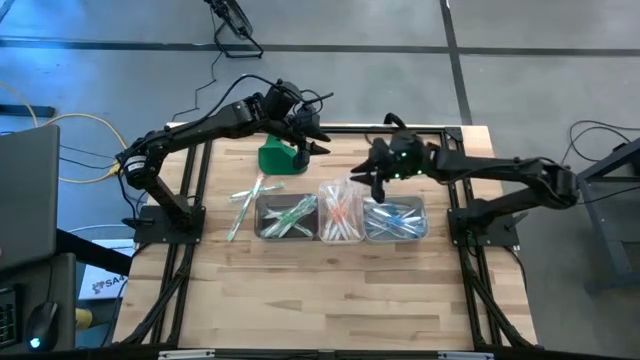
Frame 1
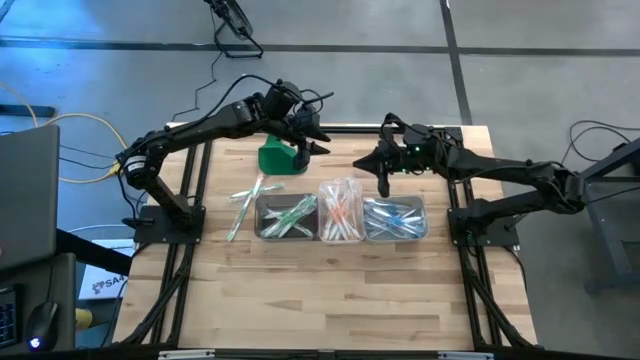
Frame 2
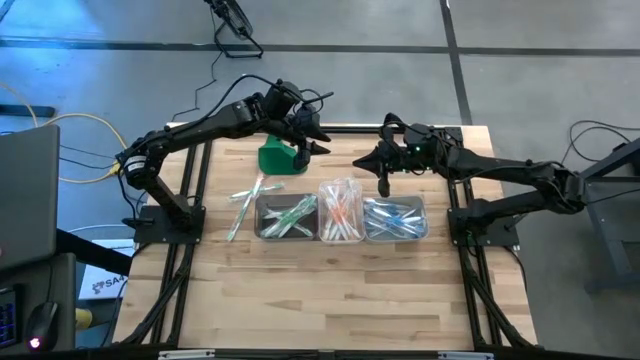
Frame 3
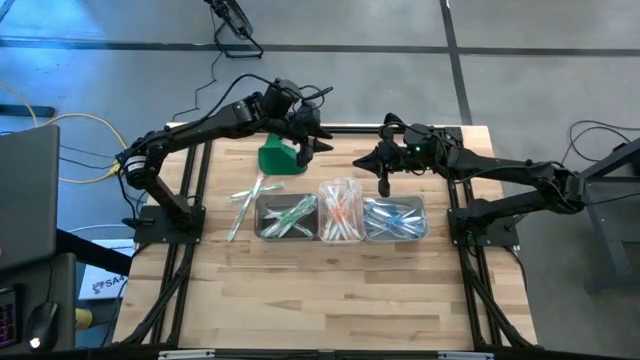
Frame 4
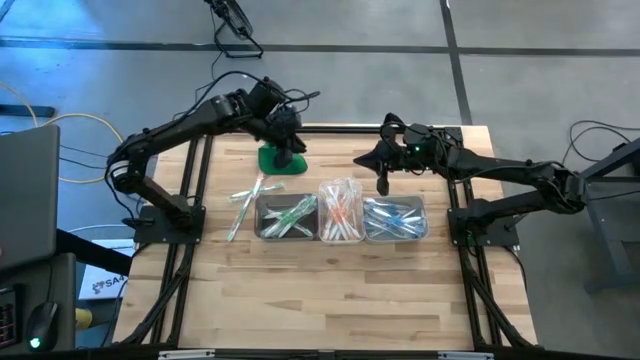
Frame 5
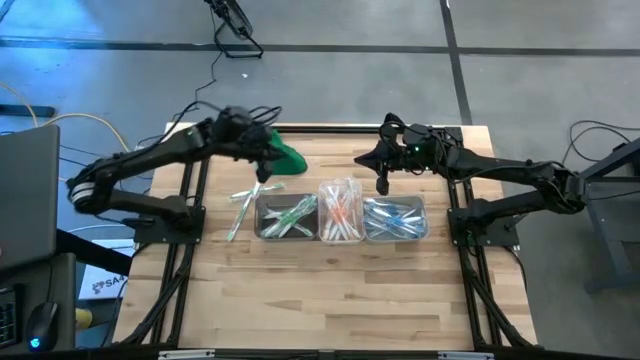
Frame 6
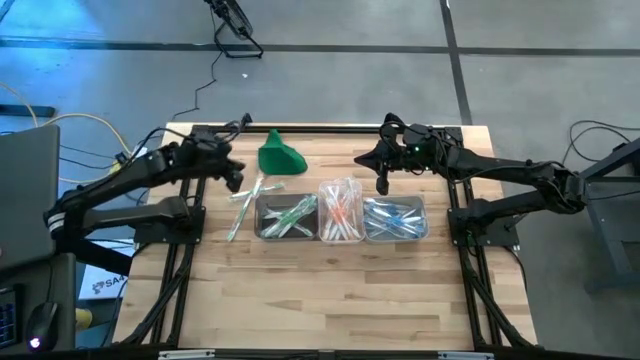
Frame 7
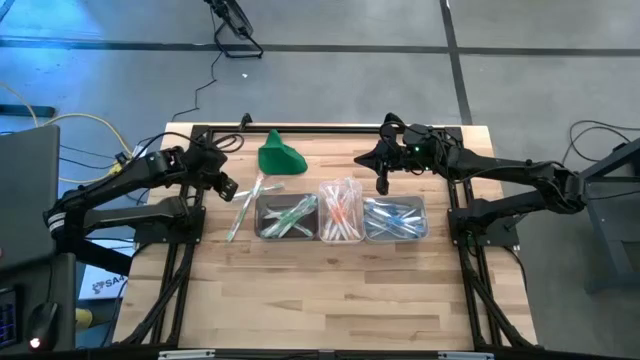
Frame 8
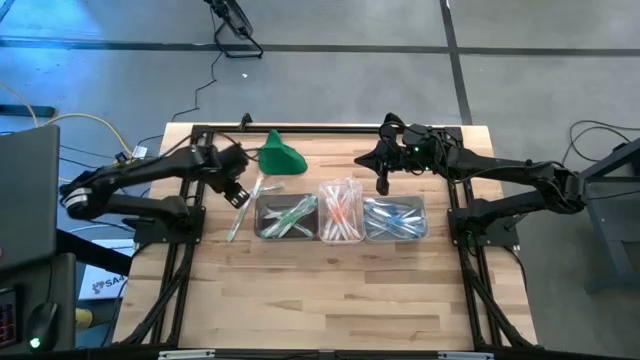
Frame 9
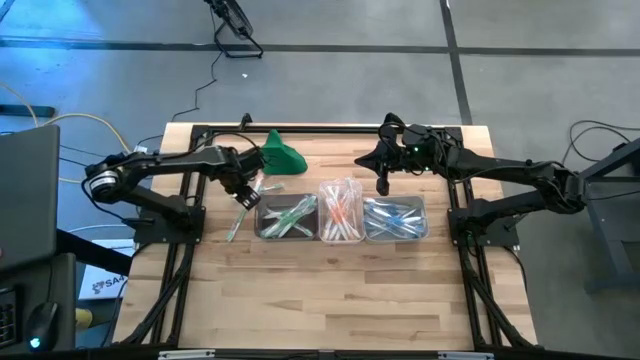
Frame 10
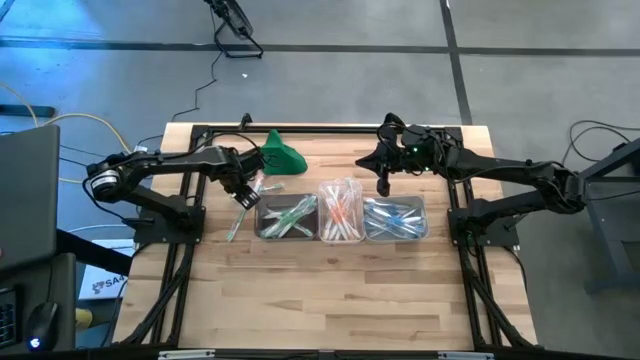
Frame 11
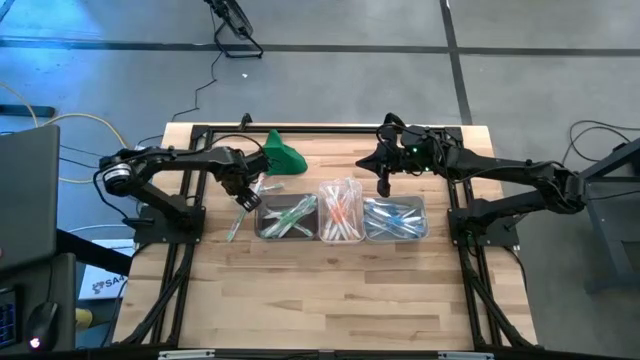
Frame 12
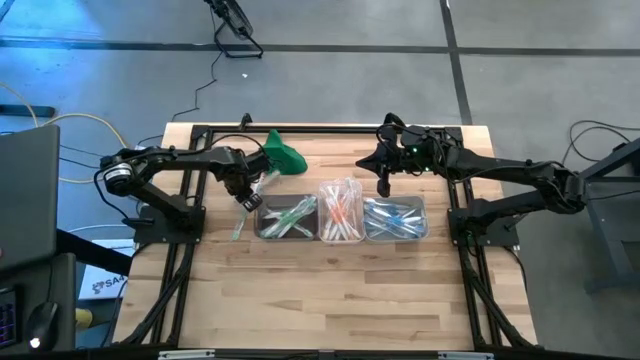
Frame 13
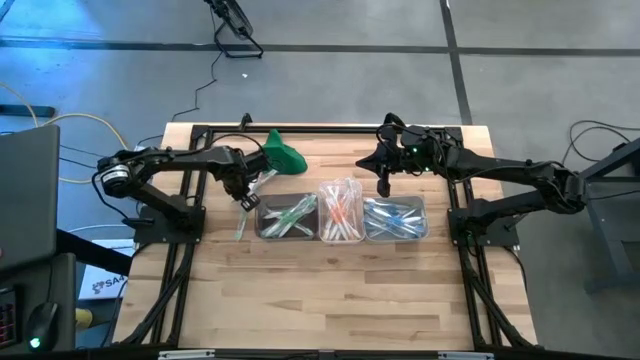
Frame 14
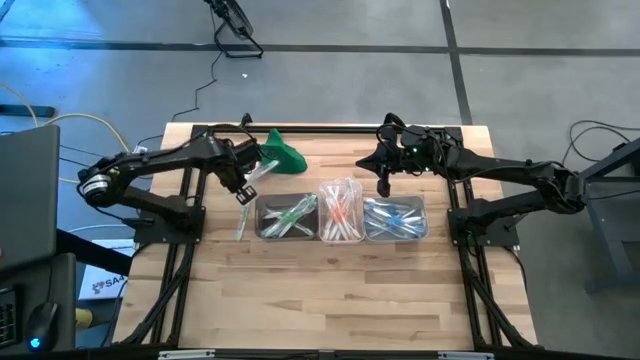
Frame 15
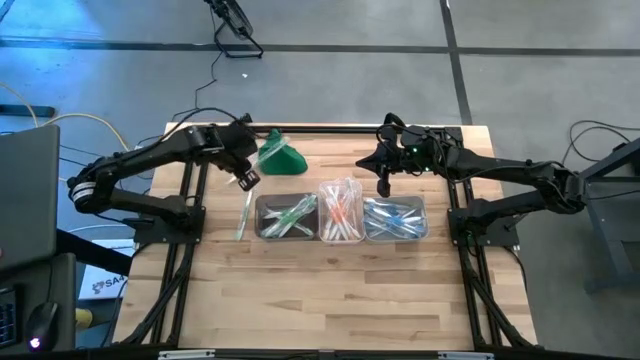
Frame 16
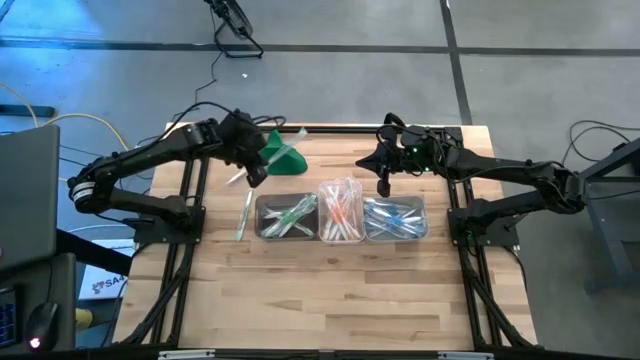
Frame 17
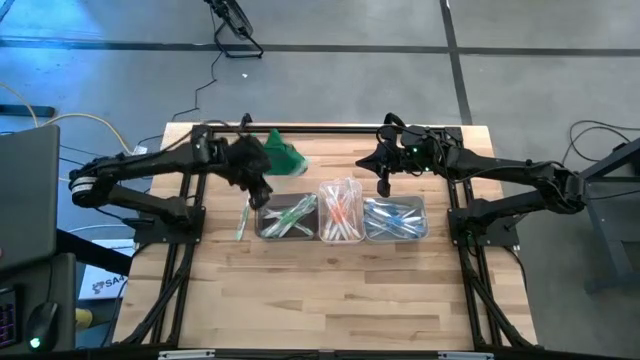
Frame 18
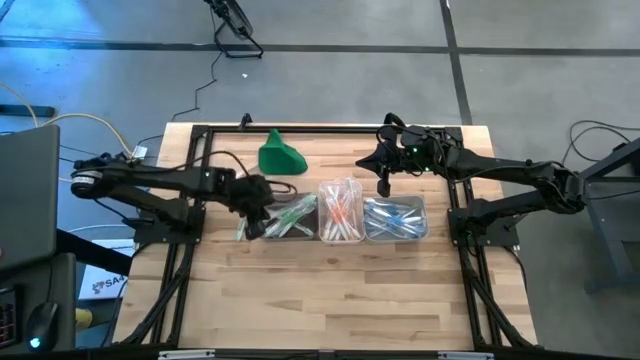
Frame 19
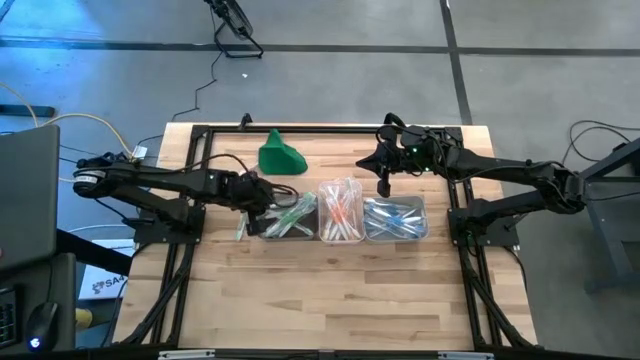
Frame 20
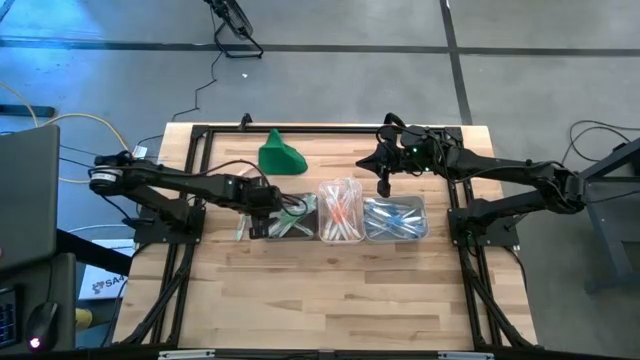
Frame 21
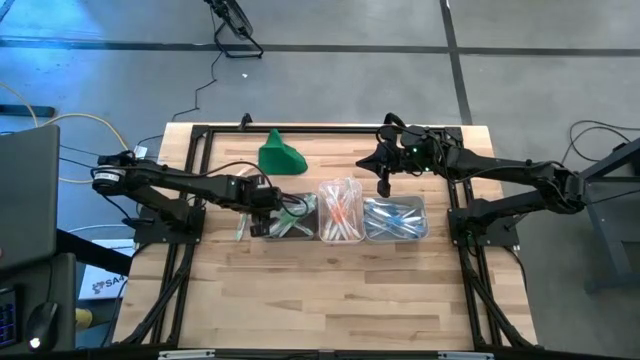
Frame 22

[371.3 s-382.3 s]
Task: Pick & Place Toothbrushes
Put the green toothbrush into the black bin

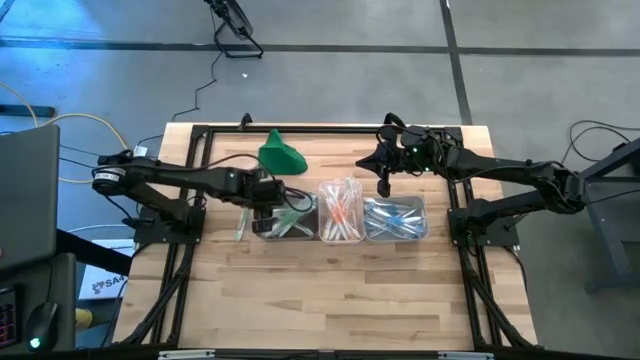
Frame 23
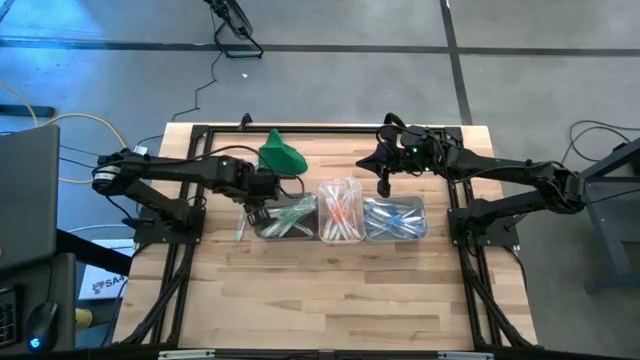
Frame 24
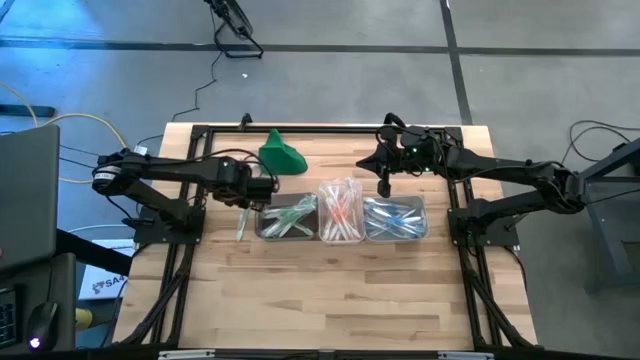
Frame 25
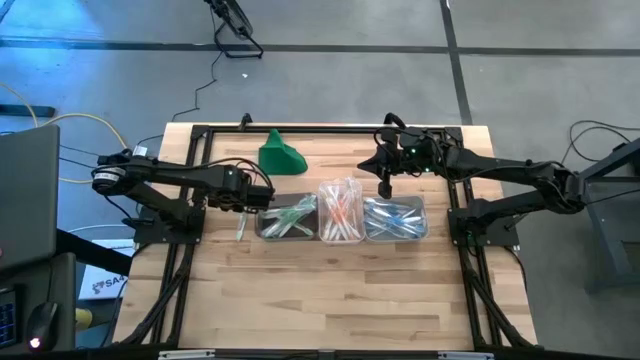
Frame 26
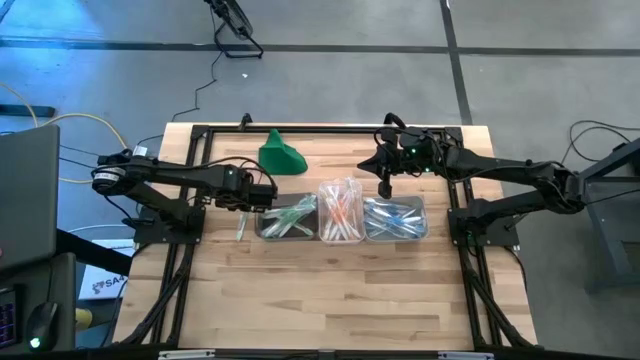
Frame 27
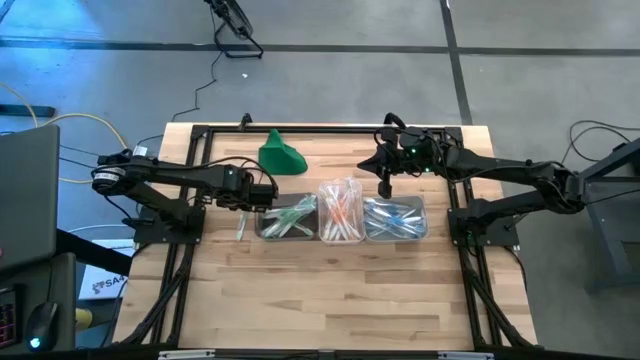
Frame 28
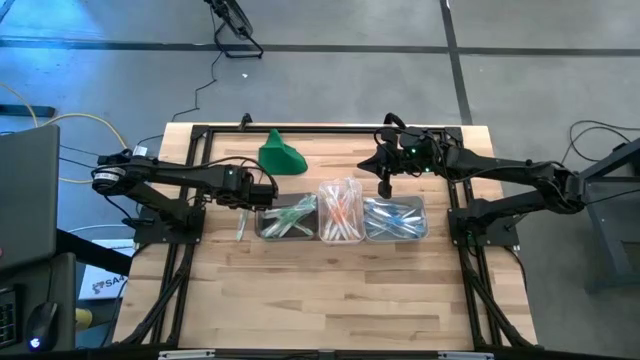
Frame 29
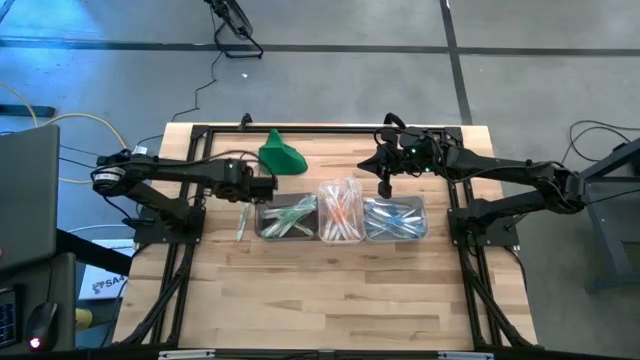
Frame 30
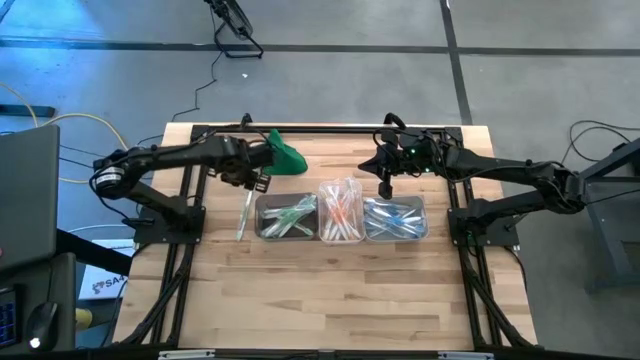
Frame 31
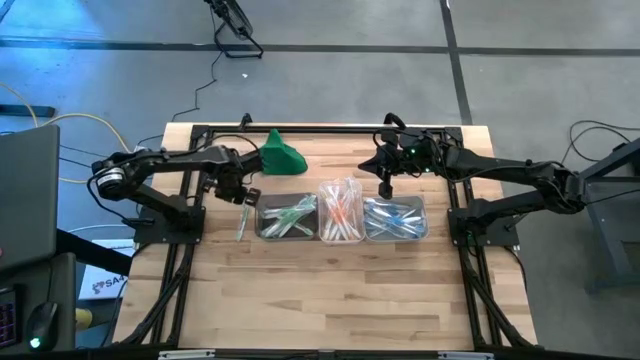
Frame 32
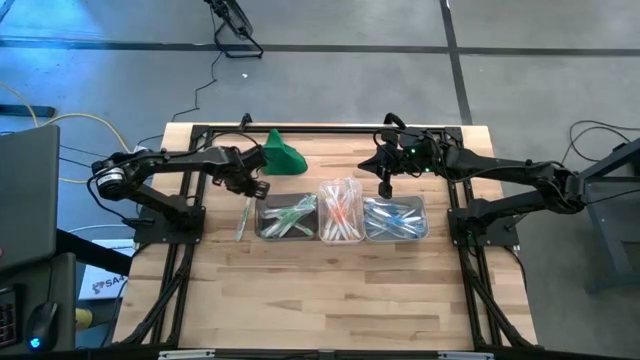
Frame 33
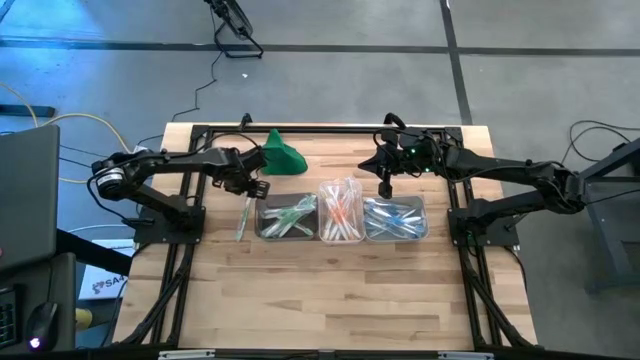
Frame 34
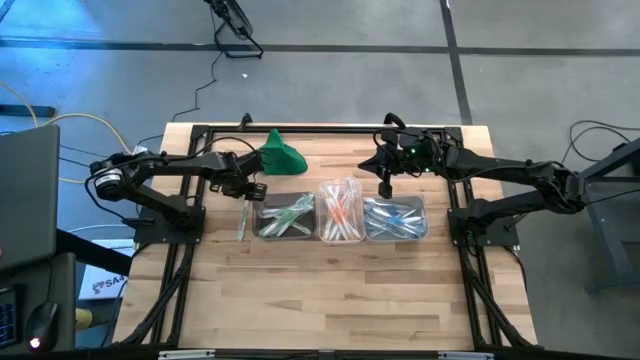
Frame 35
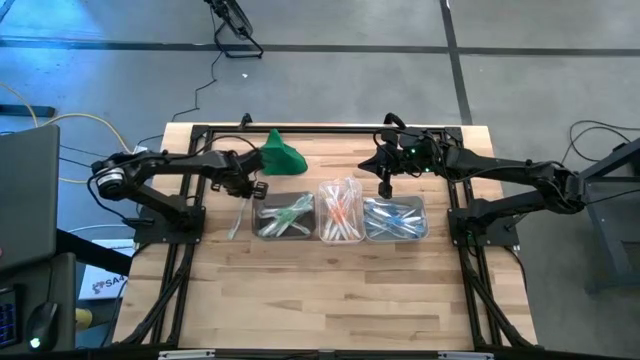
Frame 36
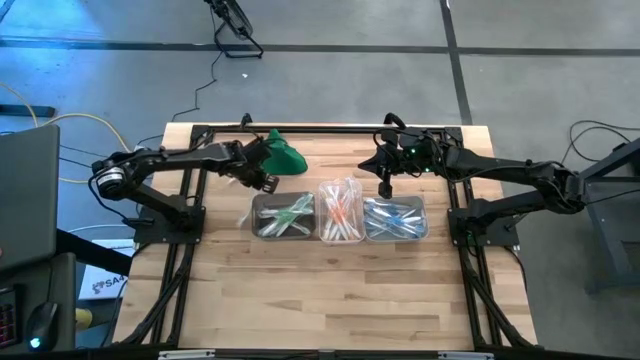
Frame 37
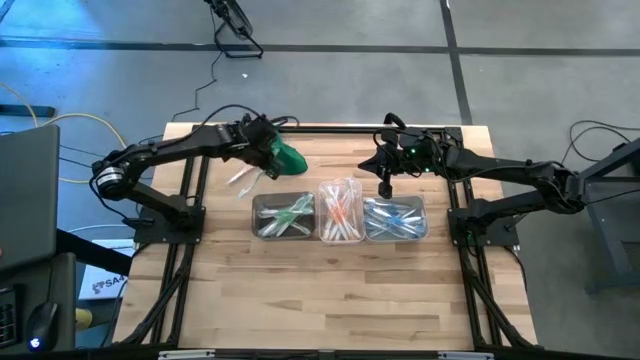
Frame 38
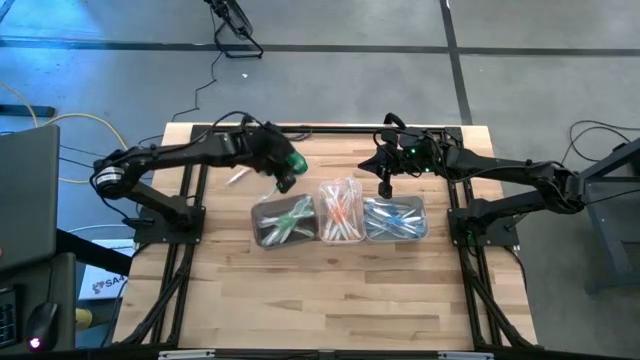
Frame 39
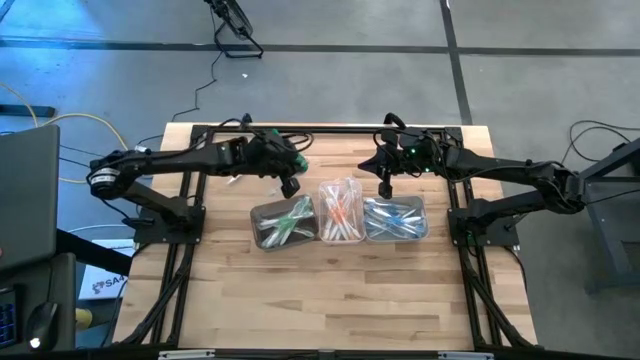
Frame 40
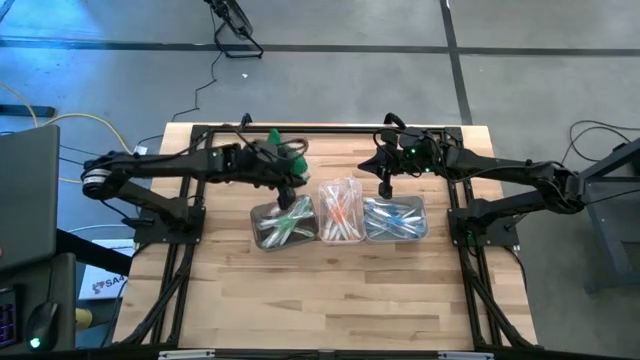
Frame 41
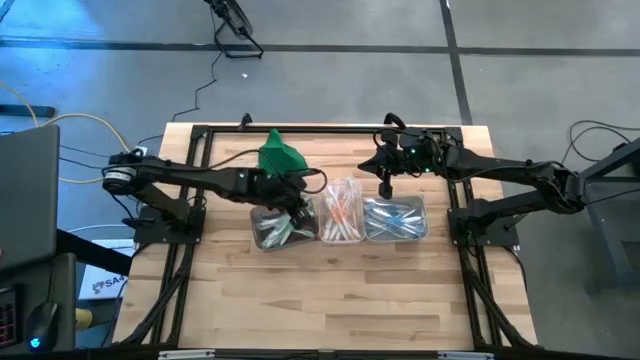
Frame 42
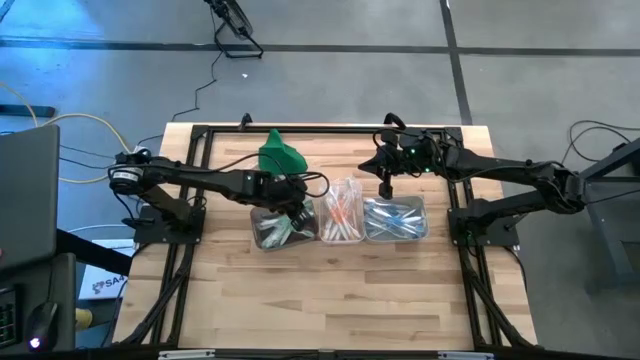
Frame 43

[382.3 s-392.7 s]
Put the green toothbrush into the black bin
